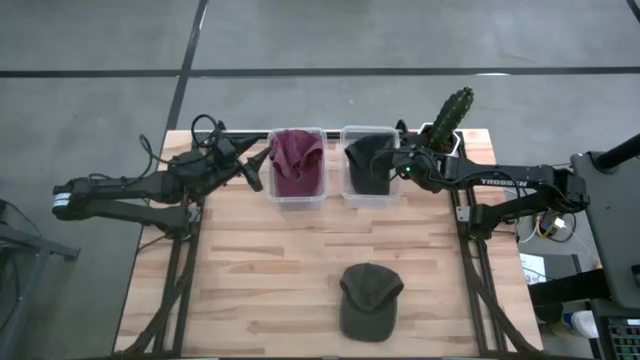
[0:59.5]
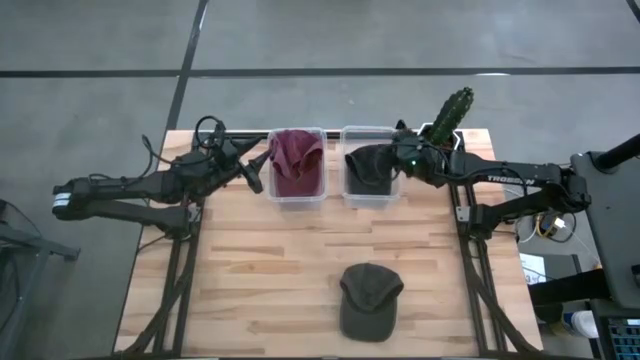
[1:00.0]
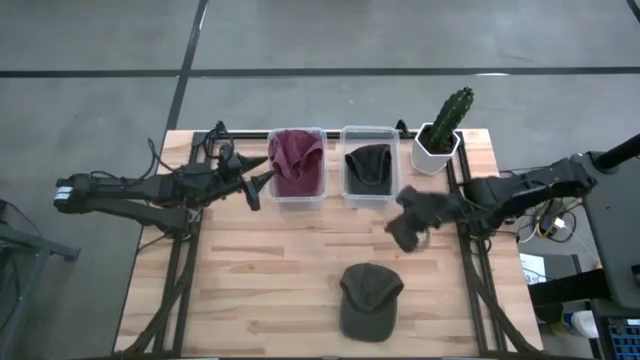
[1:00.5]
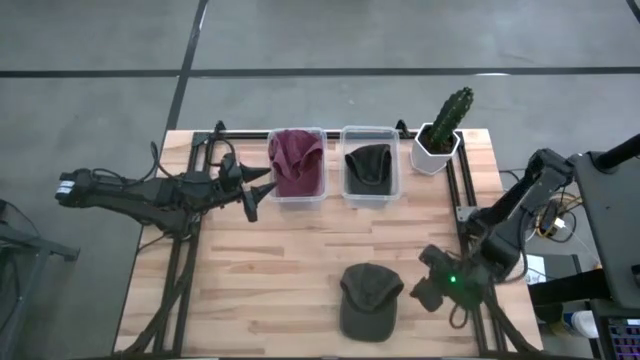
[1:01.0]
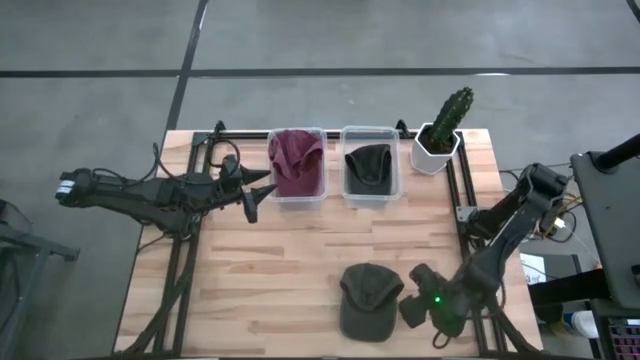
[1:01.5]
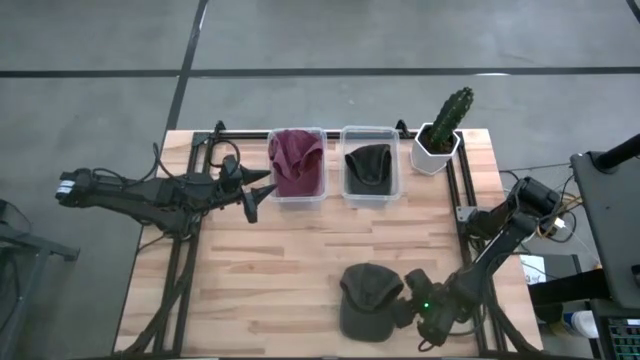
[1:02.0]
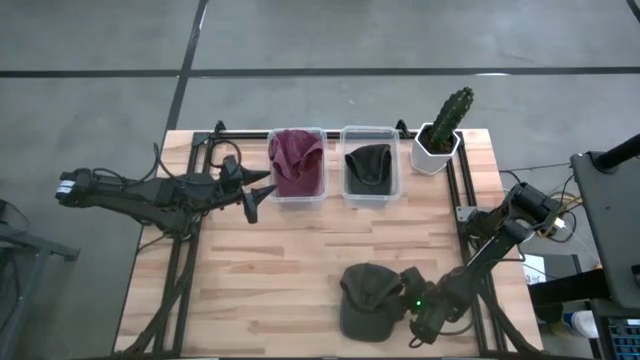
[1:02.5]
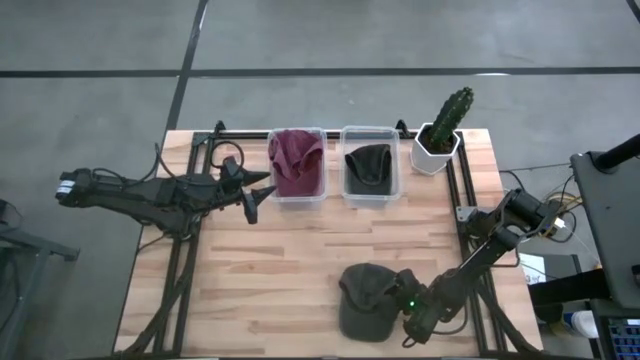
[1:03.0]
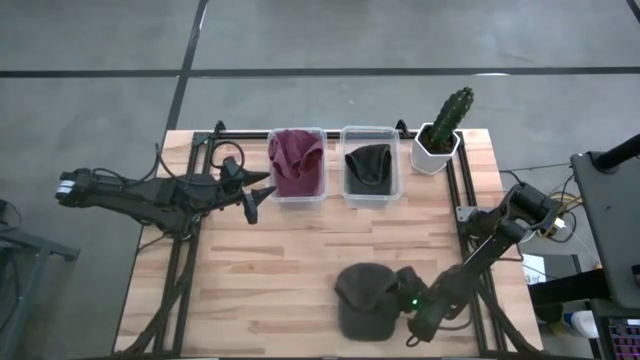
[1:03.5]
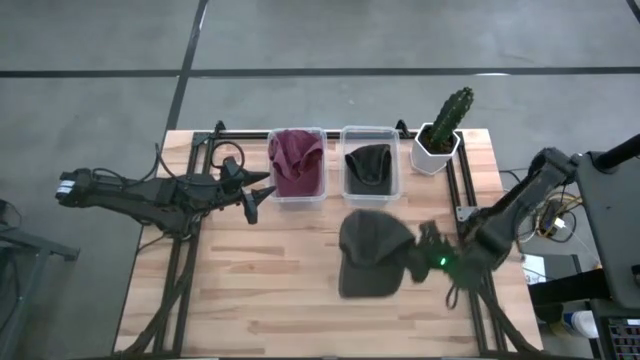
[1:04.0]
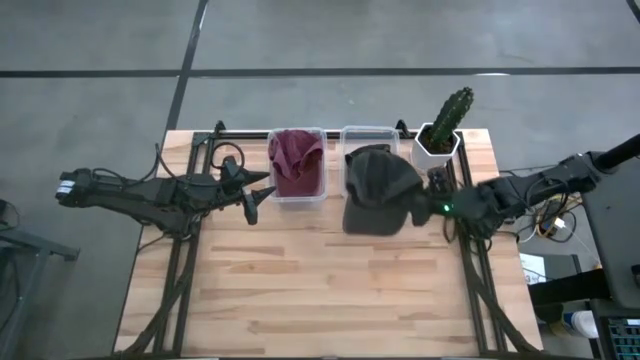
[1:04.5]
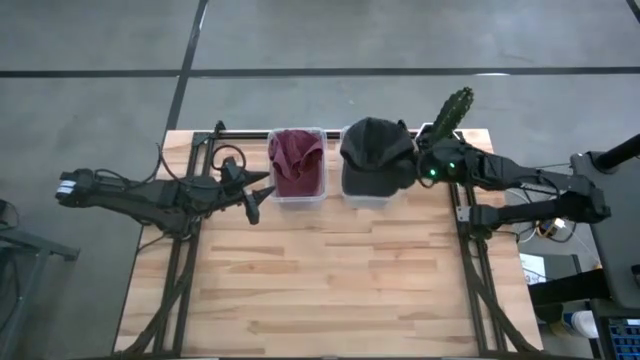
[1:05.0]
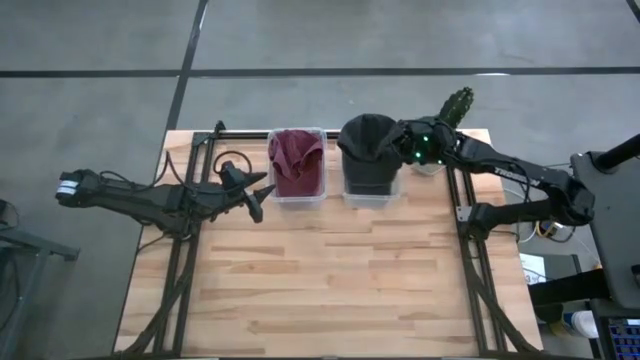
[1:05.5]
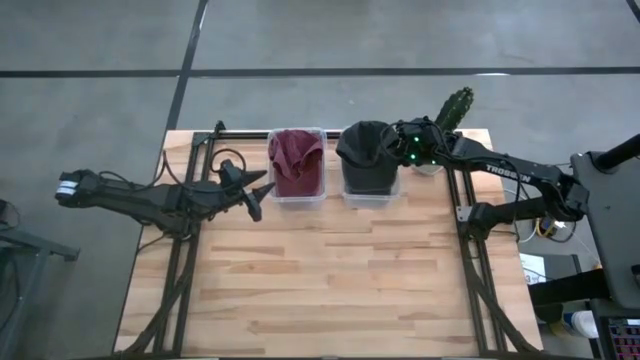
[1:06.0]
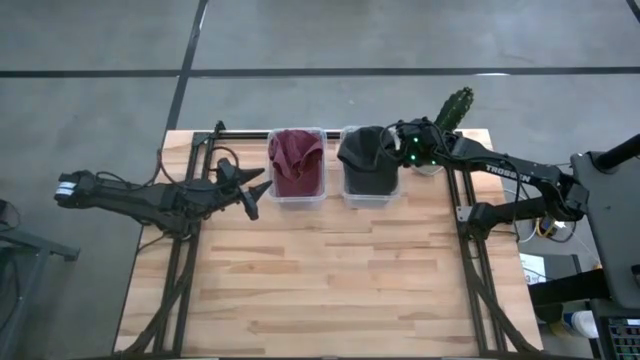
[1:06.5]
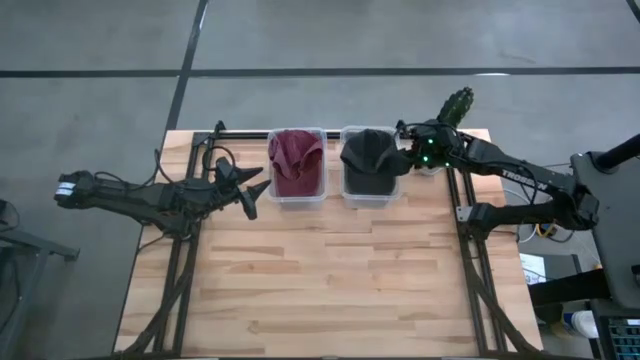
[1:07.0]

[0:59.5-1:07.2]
Task: Pick & Place hat
Put the black cap into the right transparent bin

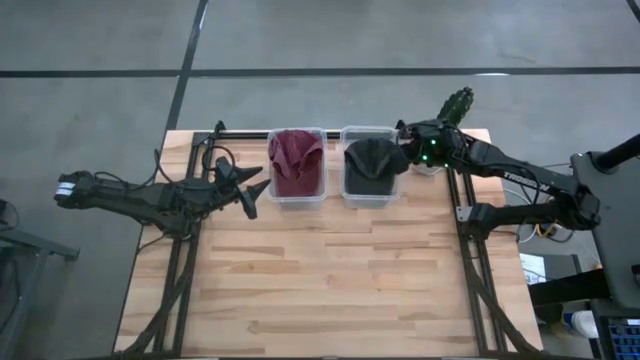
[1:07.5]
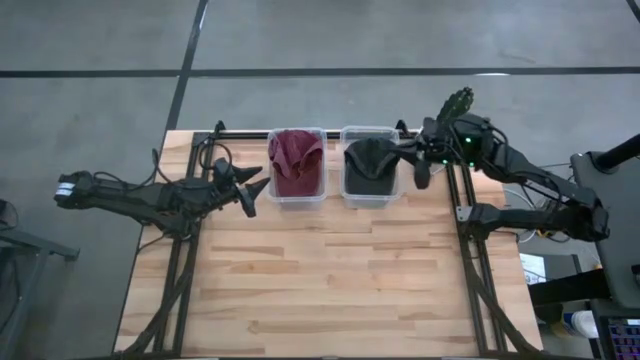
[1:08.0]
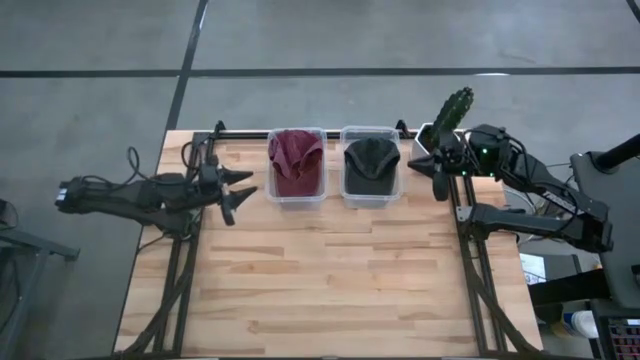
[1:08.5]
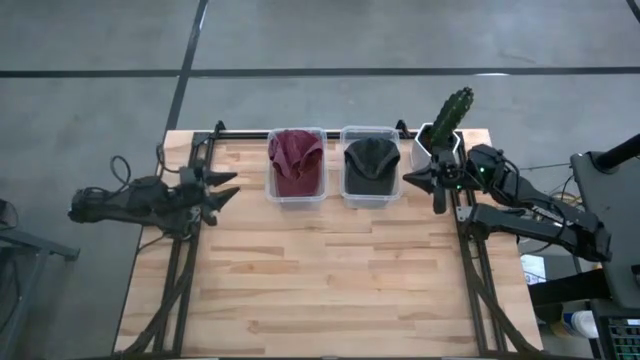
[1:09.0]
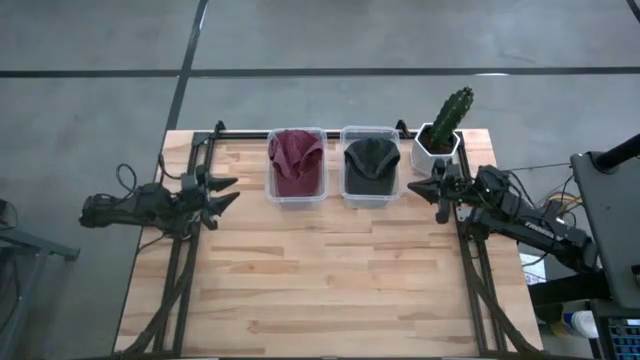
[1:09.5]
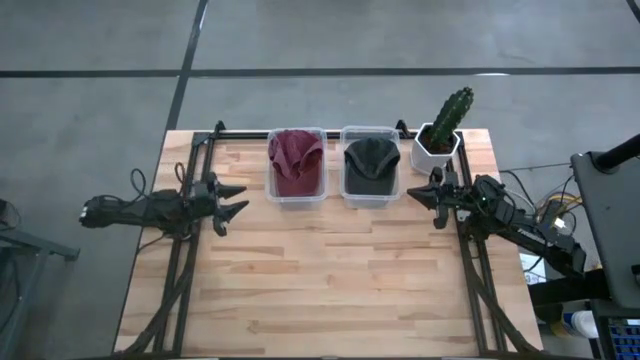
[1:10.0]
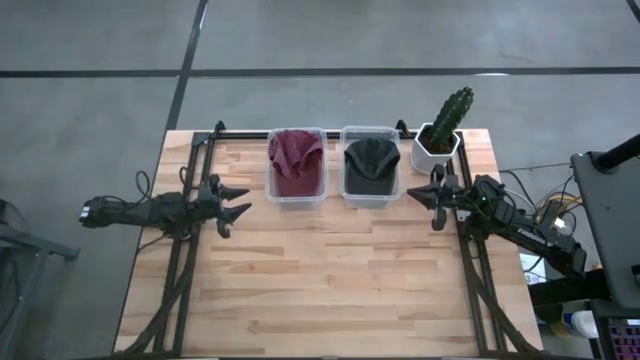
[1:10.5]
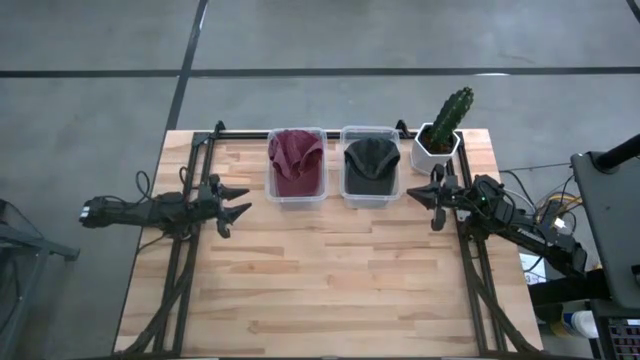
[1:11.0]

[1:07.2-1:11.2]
Return to Home Position

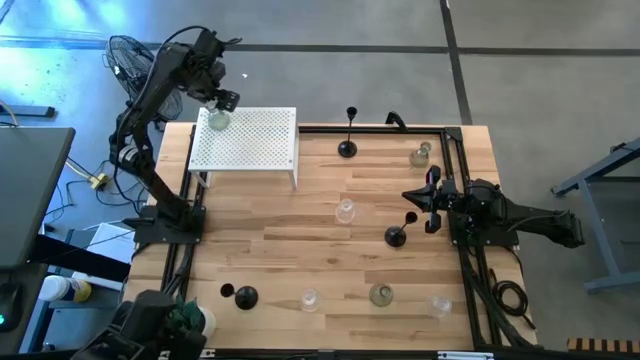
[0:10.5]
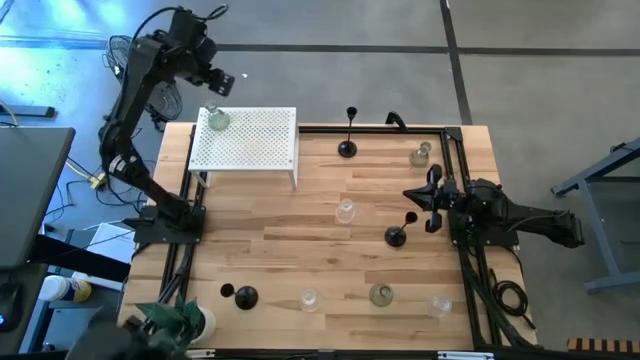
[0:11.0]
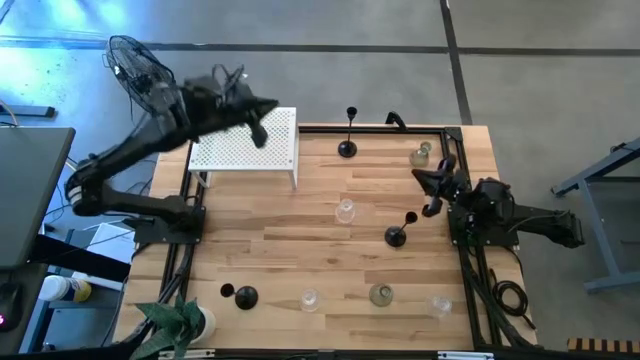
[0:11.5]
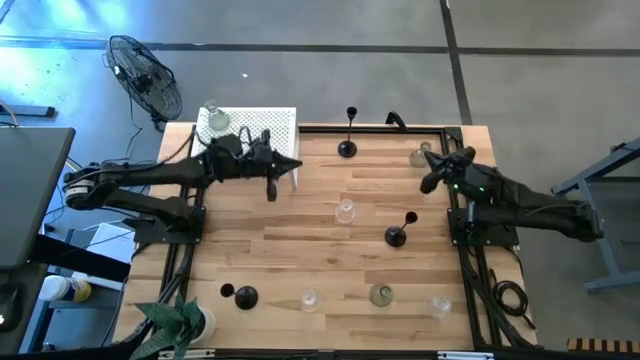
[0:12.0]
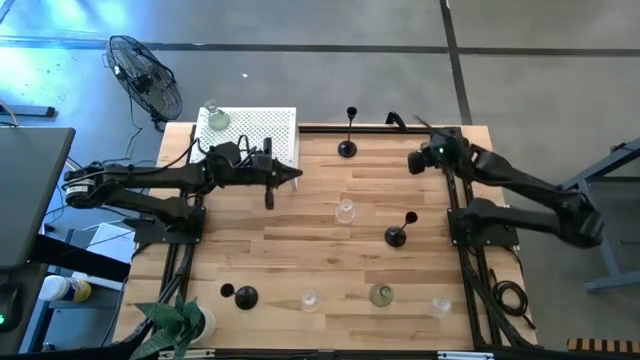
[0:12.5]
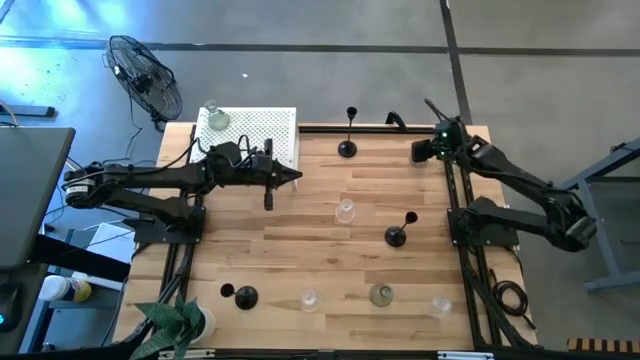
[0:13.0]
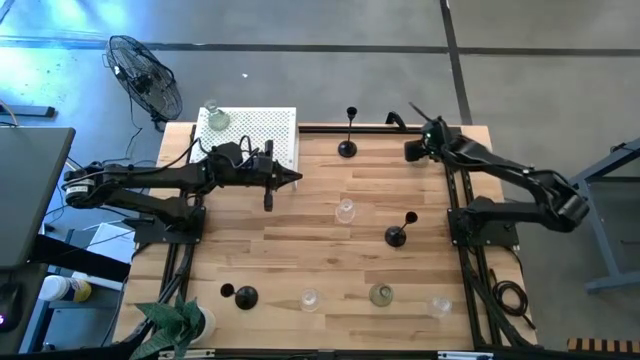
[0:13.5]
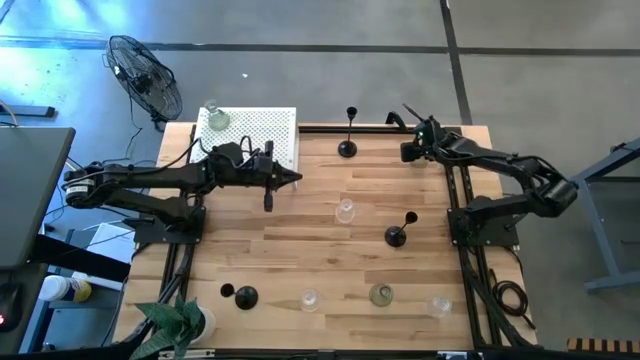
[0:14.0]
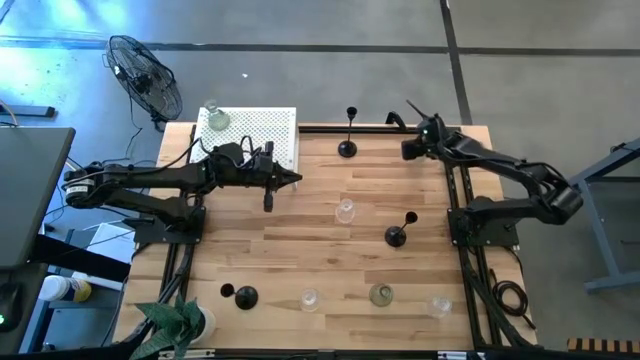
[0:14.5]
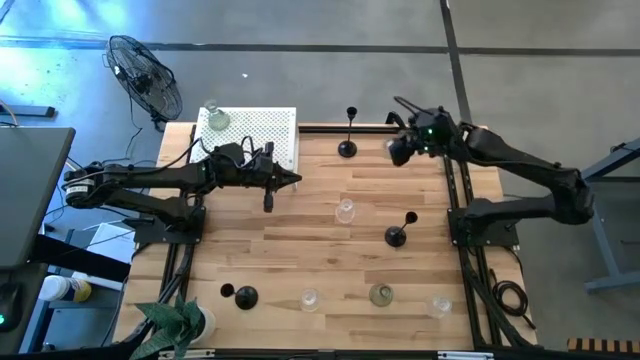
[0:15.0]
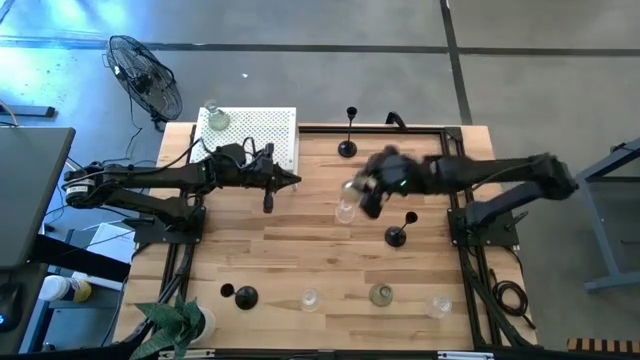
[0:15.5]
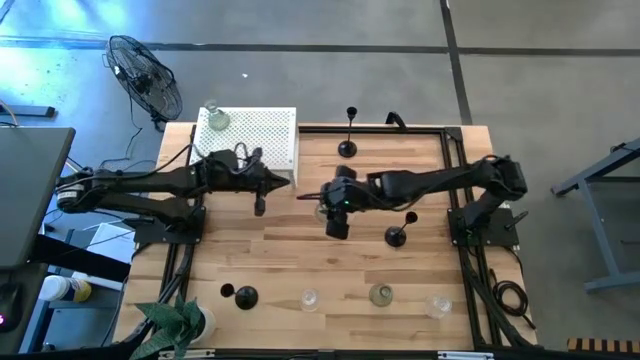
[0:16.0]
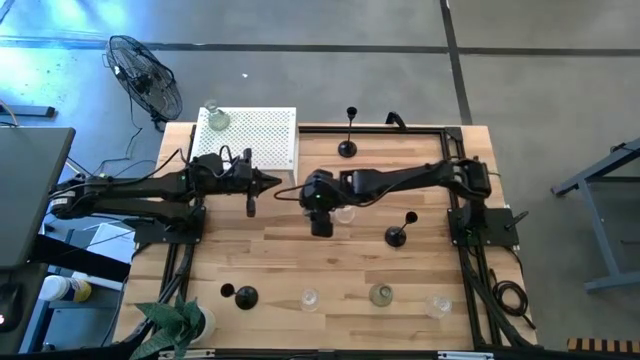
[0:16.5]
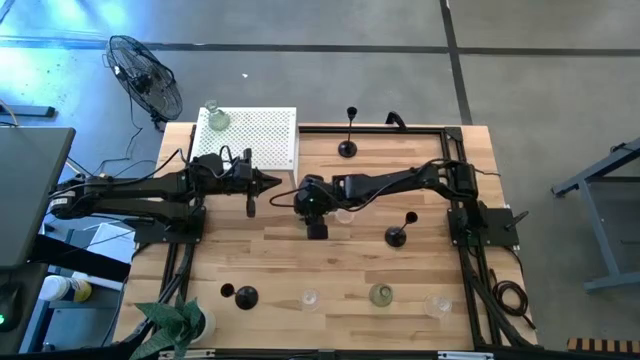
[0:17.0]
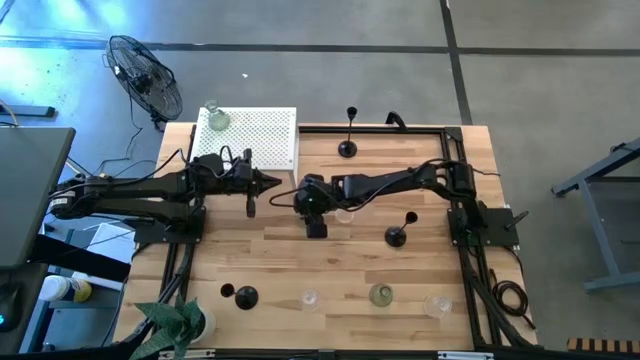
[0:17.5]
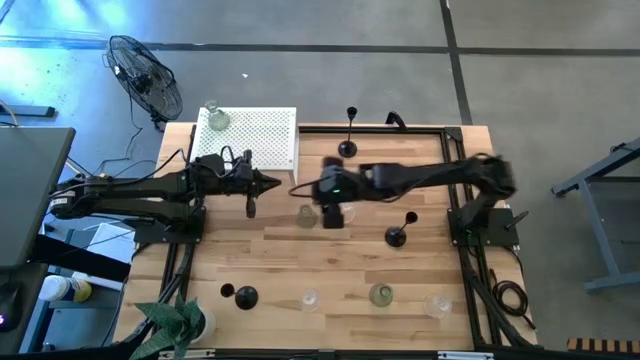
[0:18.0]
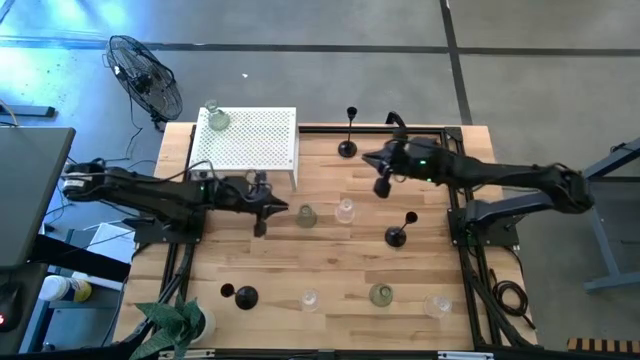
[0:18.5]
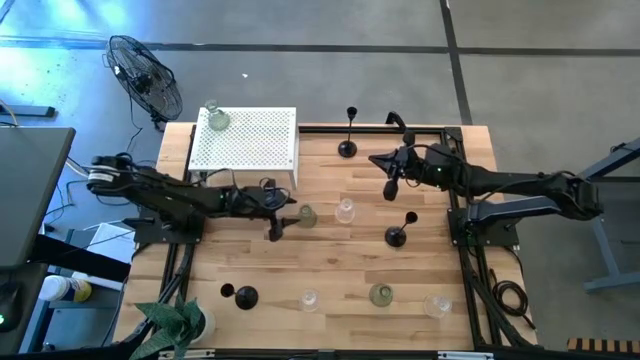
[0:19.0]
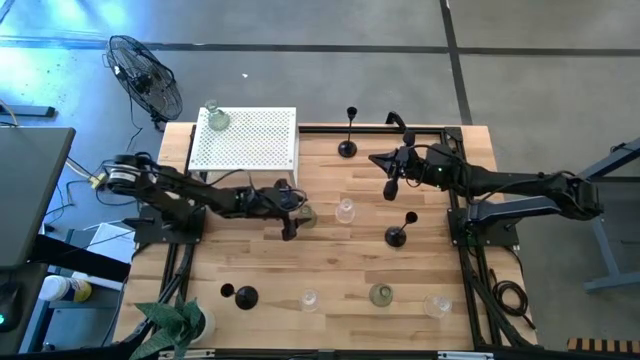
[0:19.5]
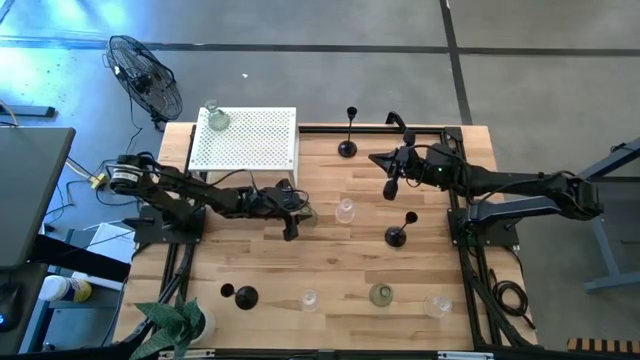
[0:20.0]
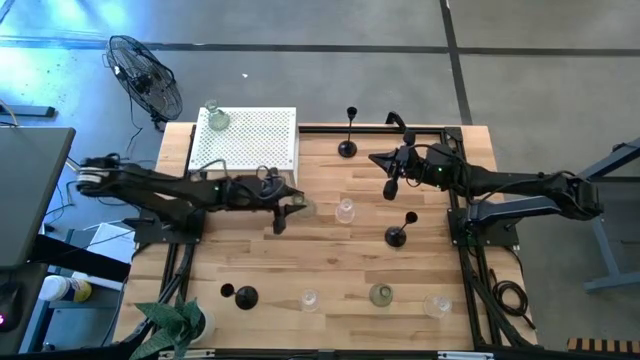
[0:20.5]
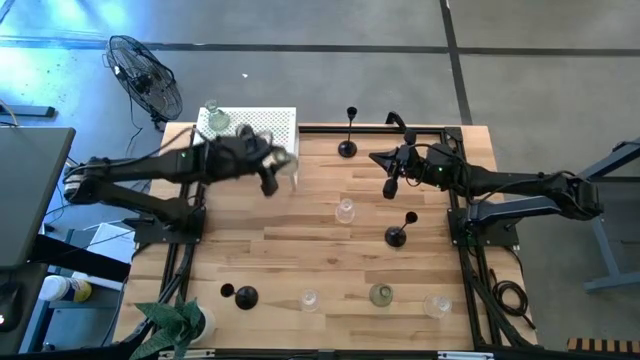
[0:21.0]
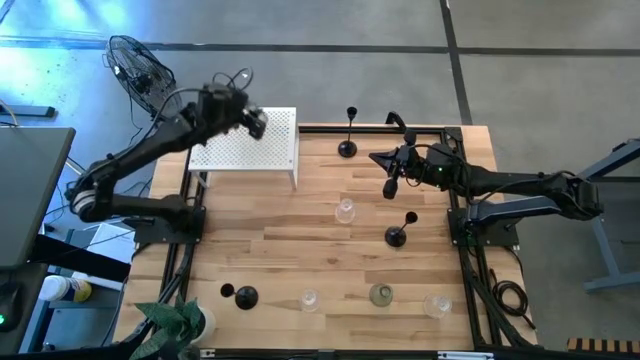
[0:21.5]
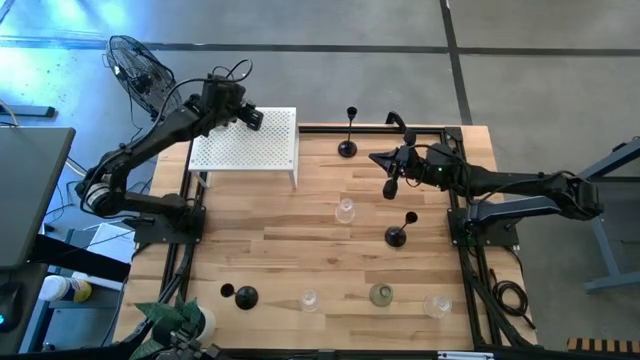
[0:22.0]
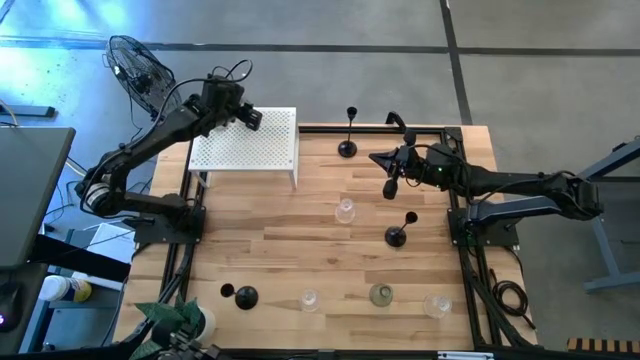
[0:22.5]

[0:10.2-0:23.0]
Task: Pick & Place candle stick holders
Put the top green candle holder on the shelf aligned with the other green candle holder
